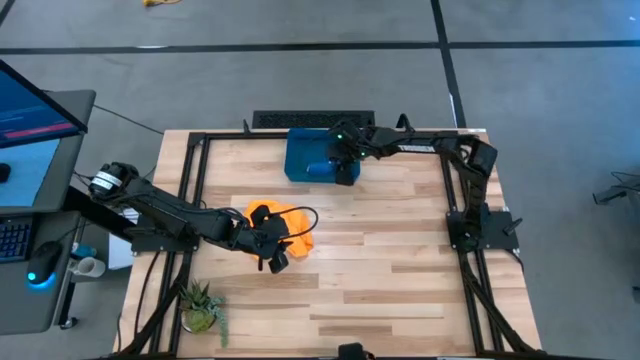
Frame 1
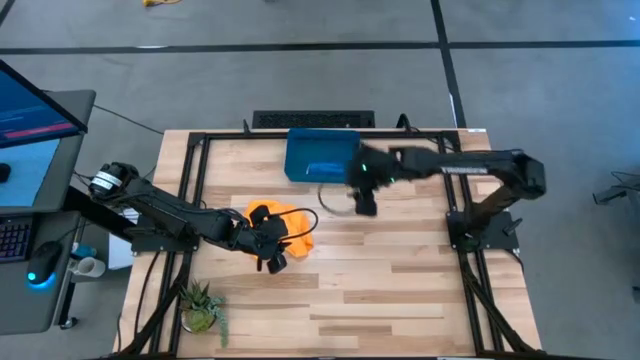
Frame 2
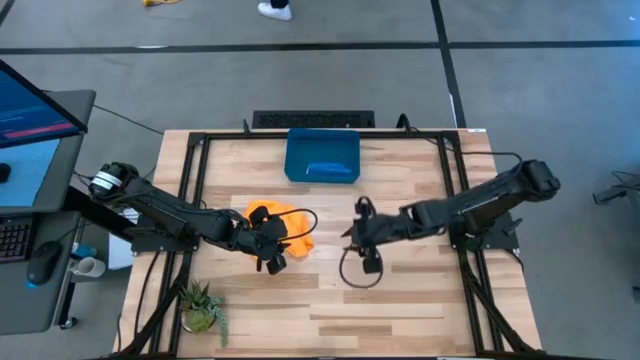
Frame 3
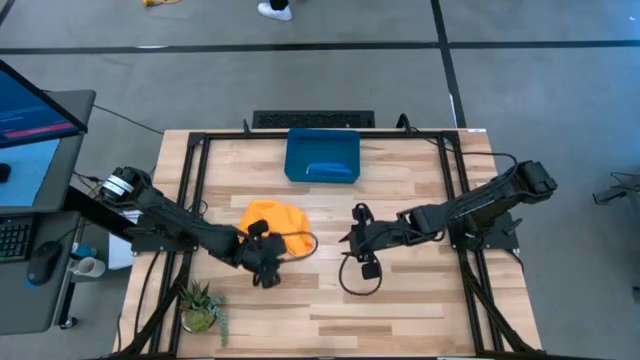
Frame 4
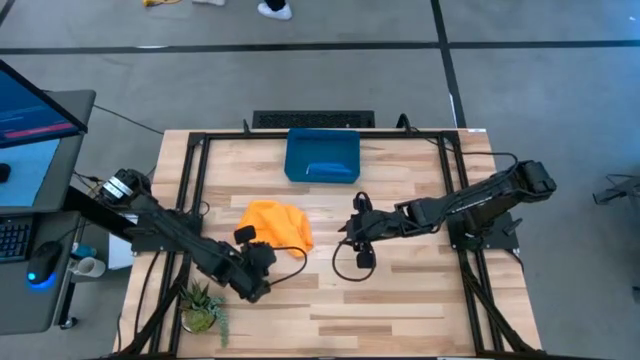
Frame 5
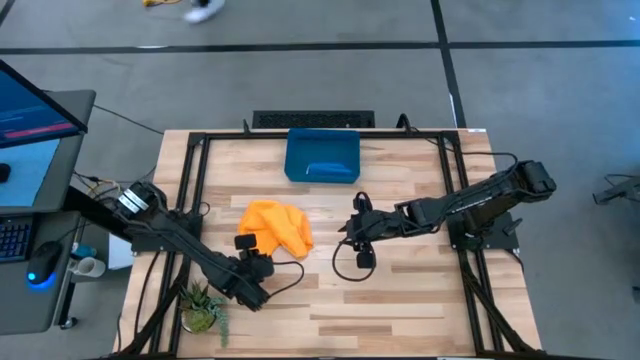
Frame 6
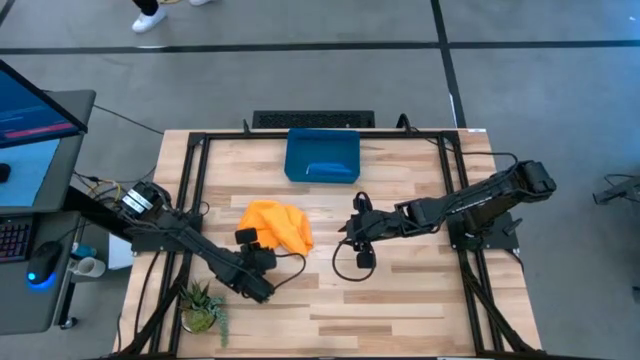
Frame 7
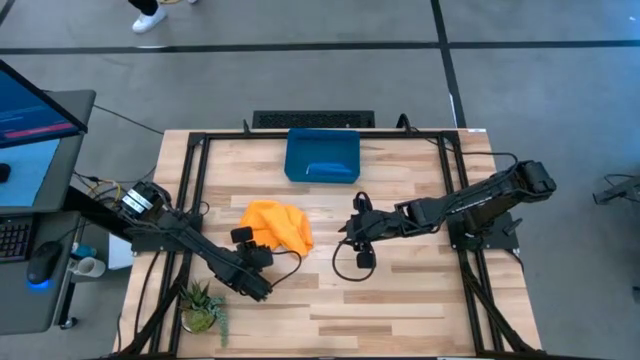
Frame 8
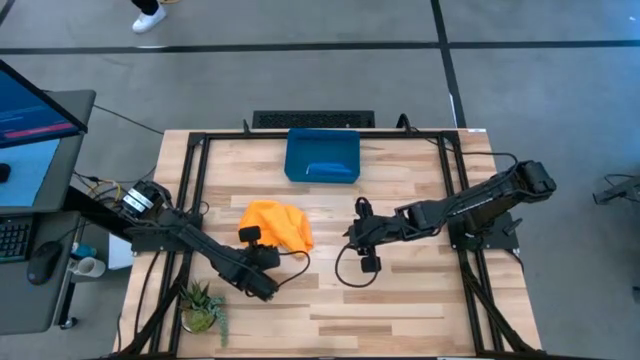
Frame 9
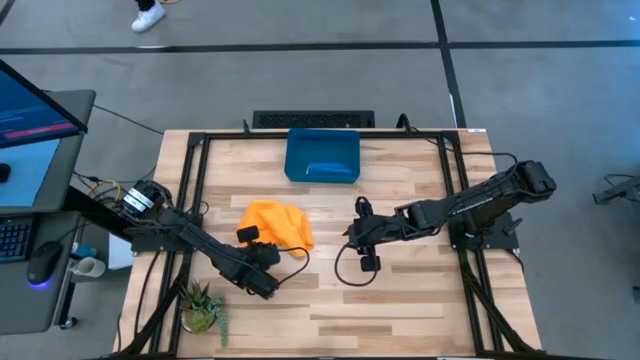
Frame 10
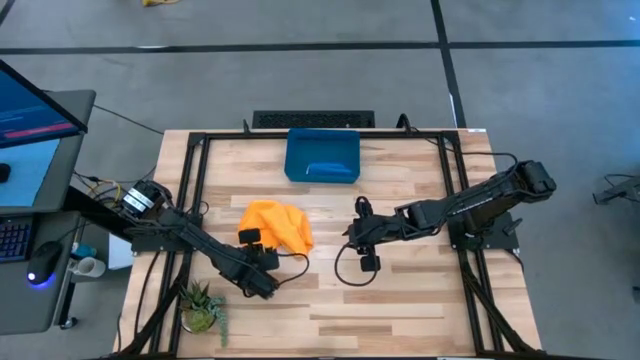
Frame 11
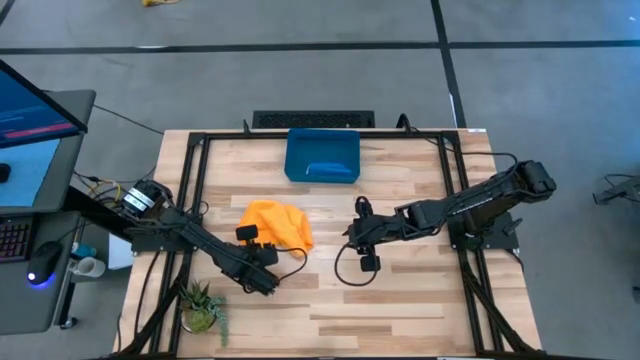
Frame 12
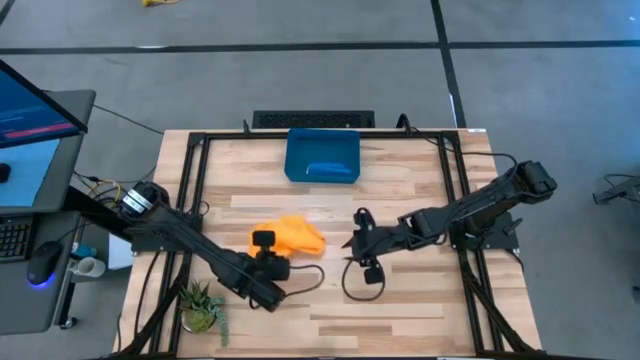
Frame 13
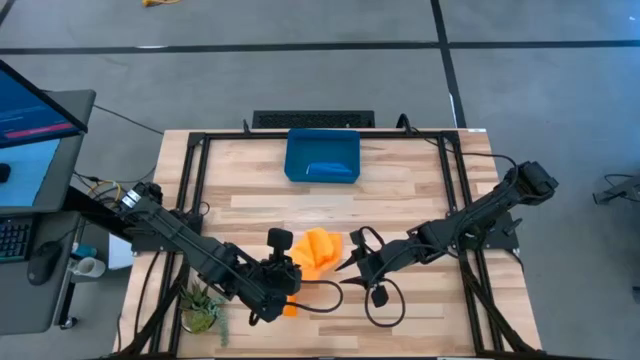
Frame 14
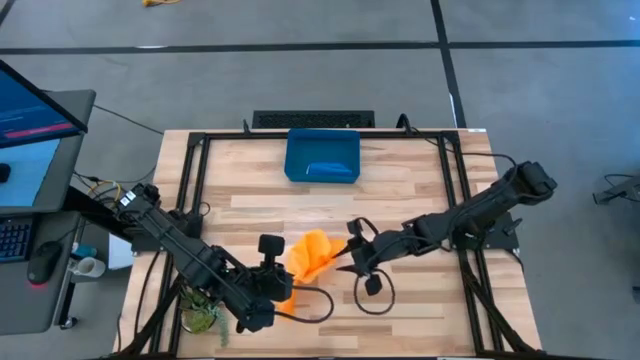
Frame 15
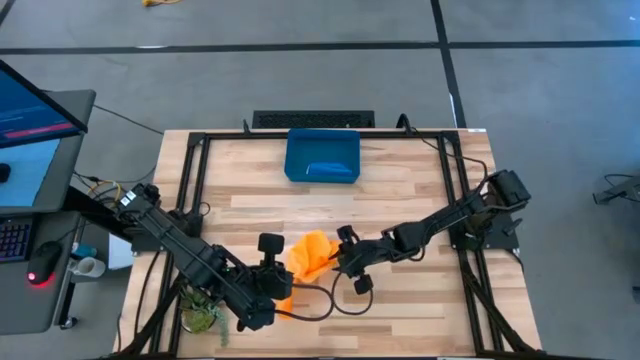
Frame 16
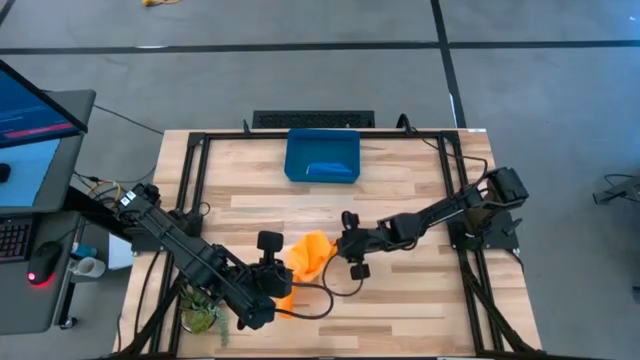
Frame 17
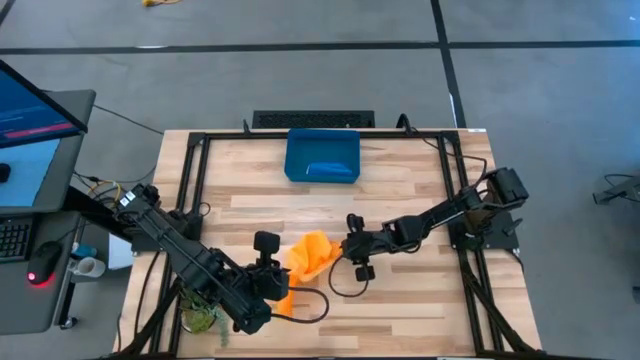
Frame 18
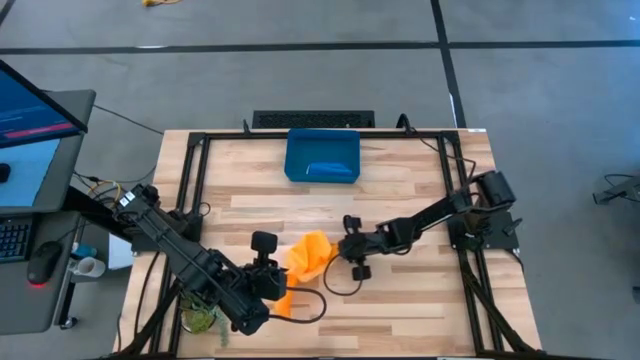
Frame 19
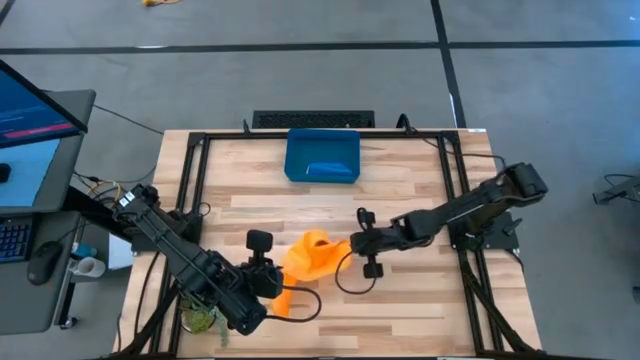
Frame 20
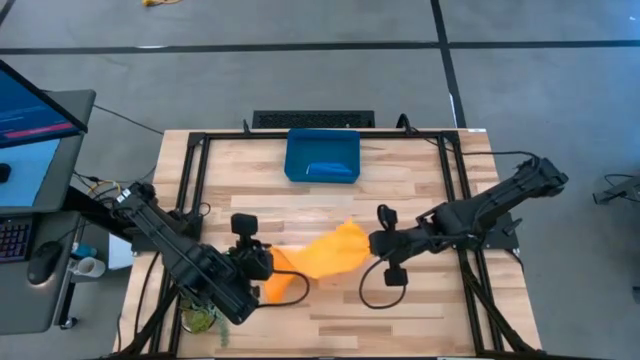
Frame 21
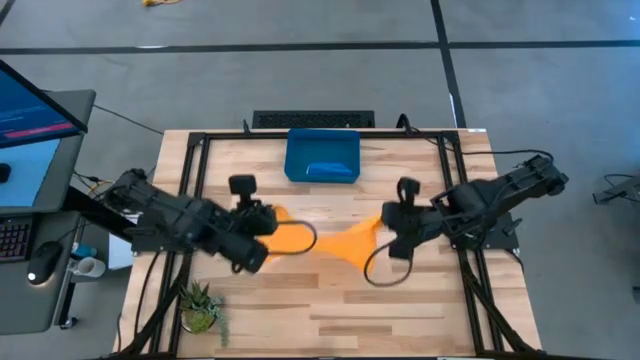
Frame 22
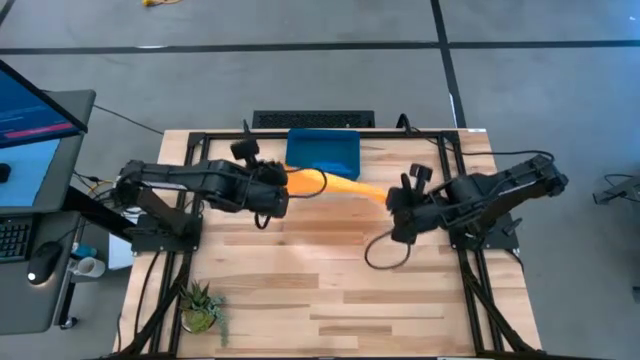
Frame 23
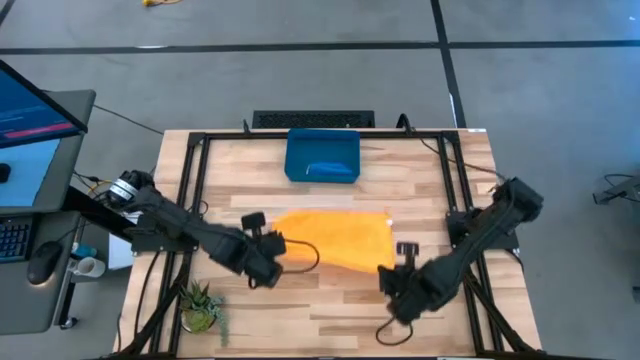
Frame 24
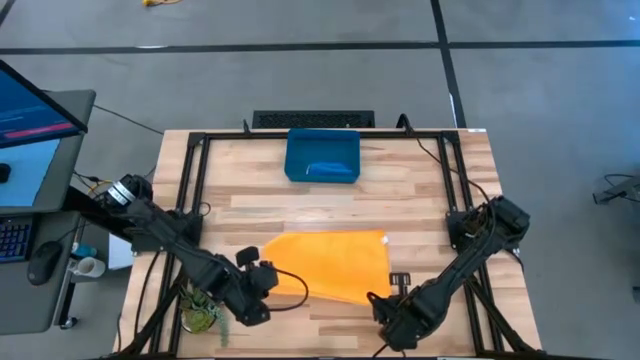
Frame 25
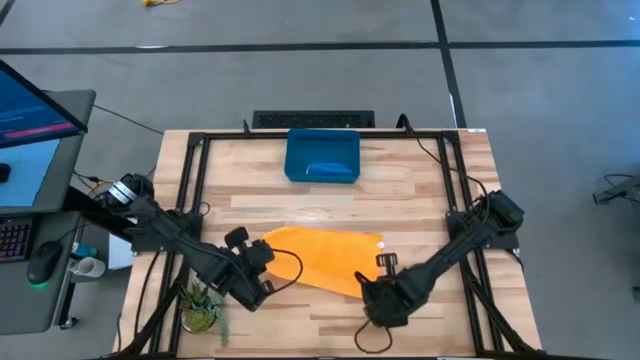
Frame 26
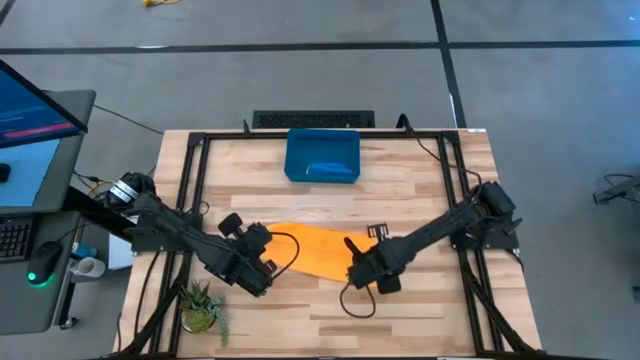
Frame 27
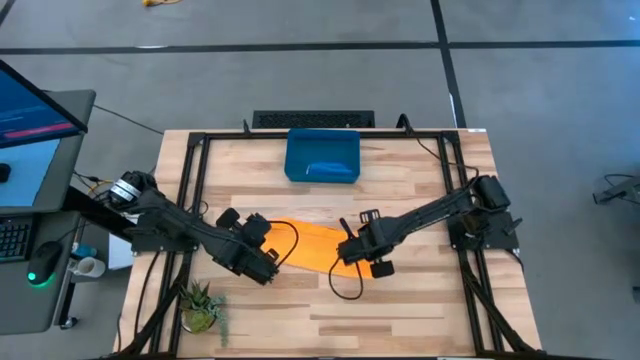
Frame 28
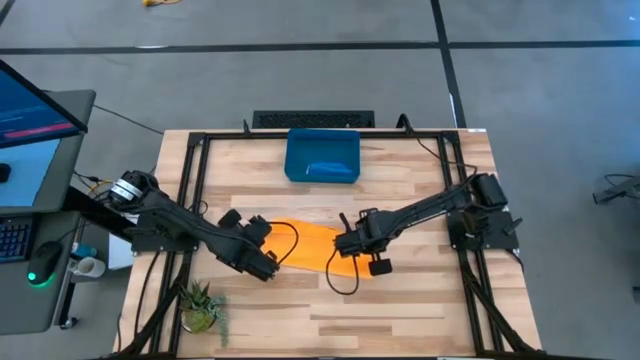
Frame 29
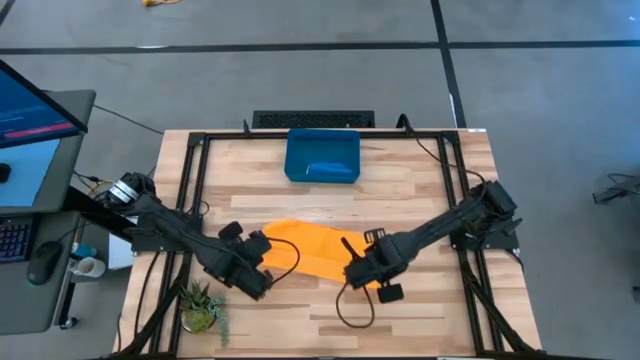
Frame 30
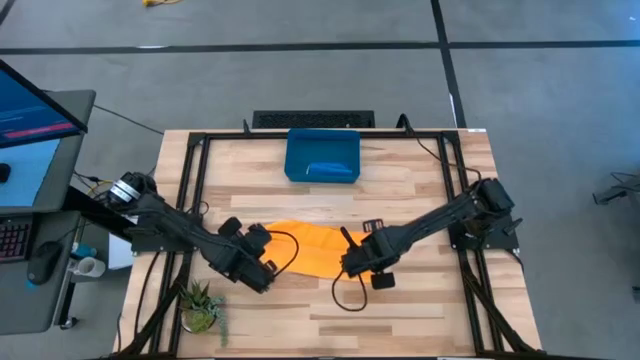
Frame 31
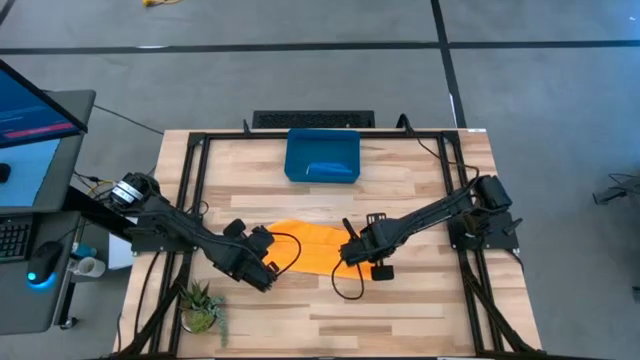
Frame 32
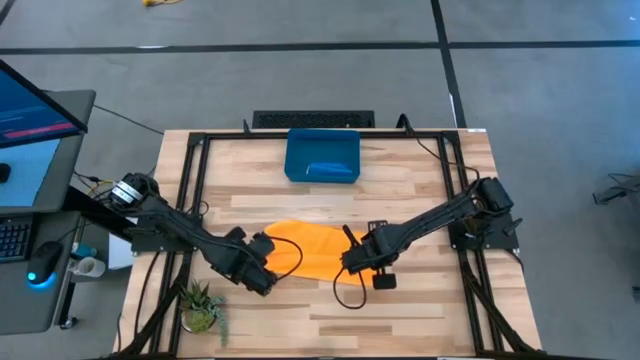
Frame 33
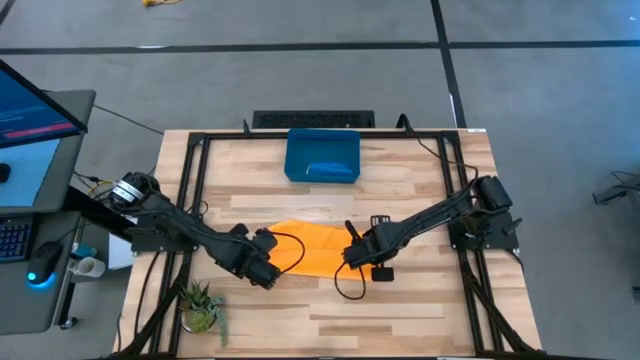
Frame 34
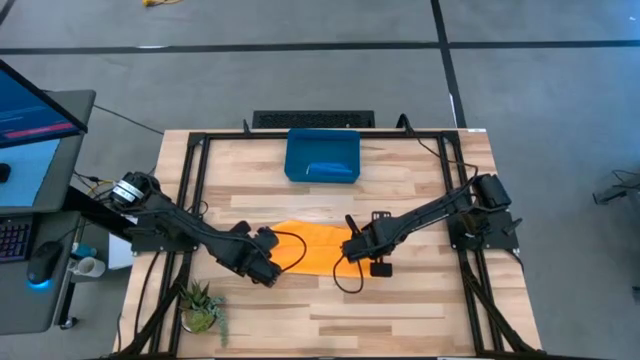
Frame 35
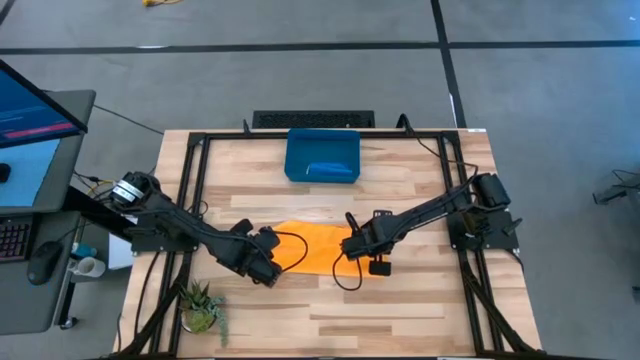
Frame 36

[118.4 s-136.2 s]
Task: Roll microfiber towels into tight, uniform cylinder then place into a basket
Fold the orange microfiber towel
